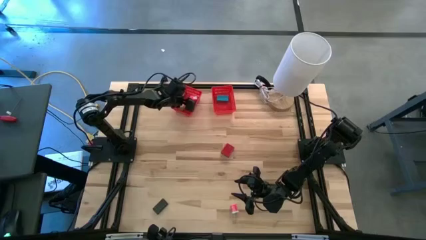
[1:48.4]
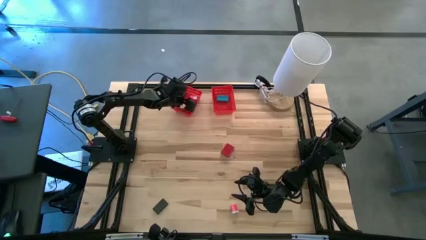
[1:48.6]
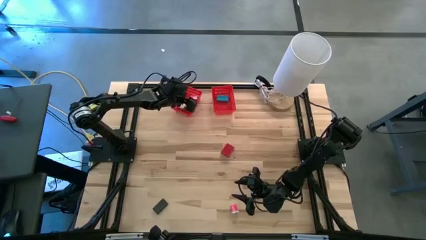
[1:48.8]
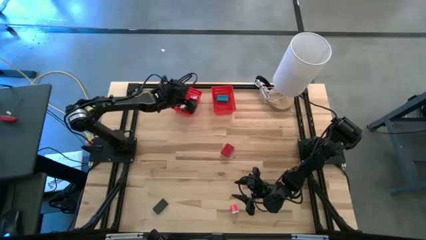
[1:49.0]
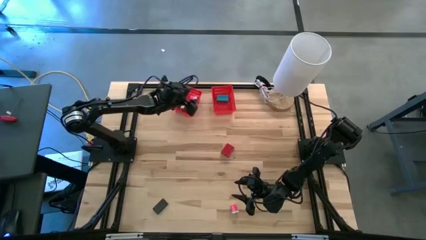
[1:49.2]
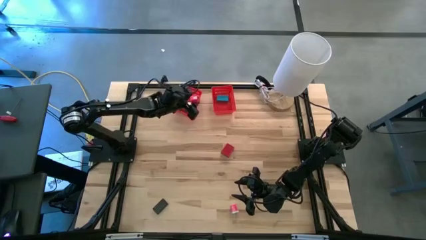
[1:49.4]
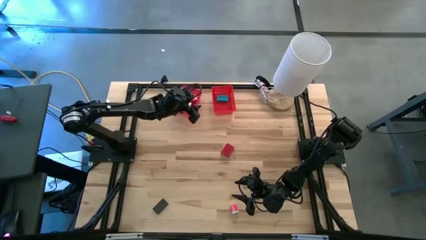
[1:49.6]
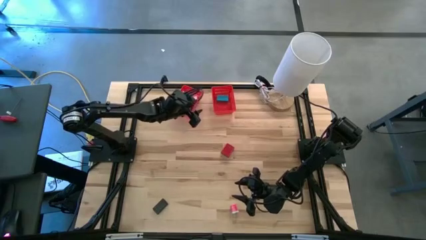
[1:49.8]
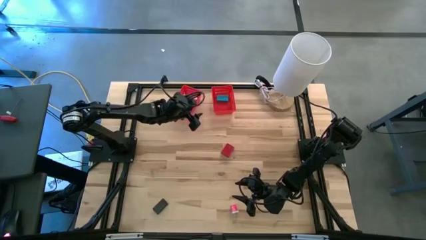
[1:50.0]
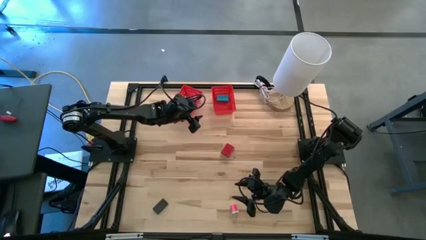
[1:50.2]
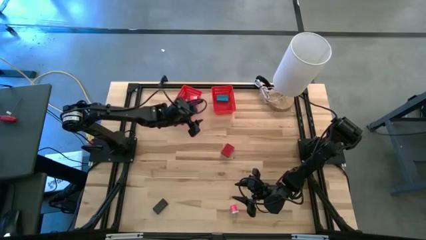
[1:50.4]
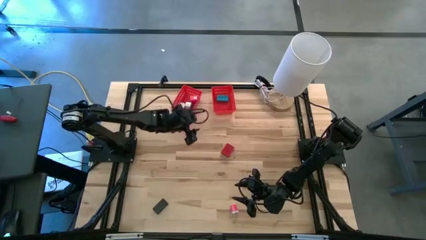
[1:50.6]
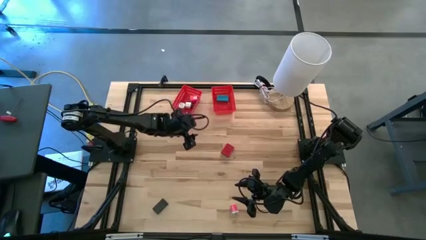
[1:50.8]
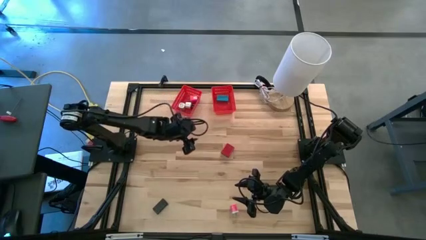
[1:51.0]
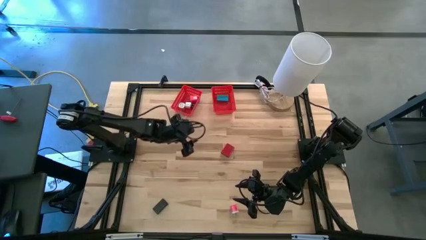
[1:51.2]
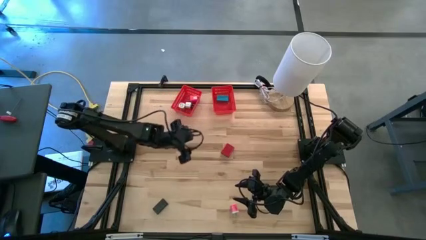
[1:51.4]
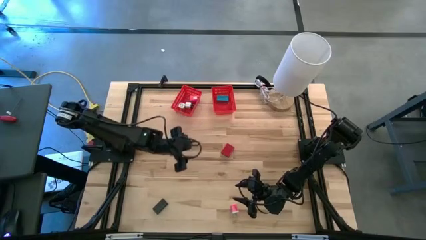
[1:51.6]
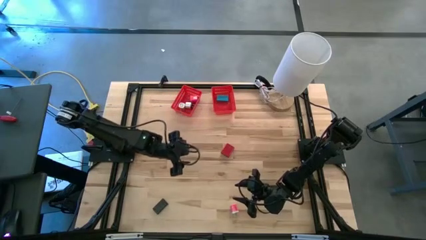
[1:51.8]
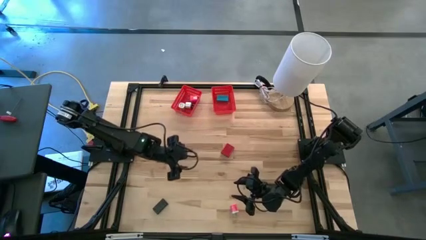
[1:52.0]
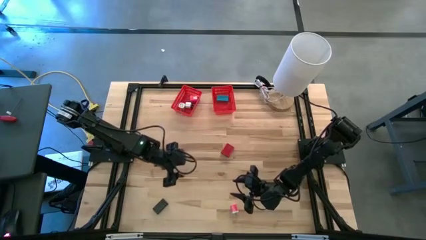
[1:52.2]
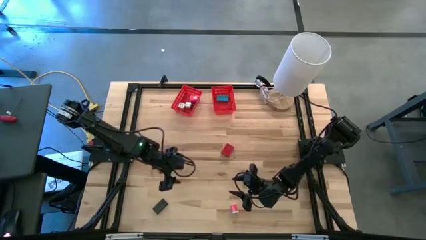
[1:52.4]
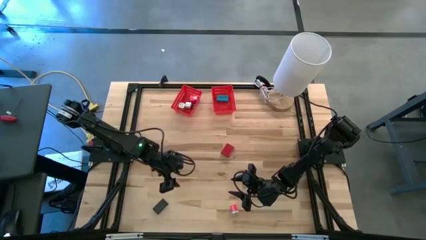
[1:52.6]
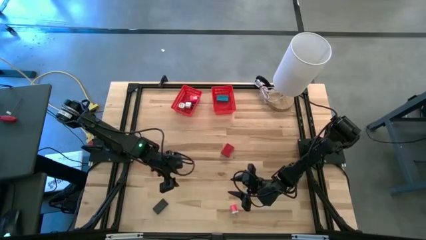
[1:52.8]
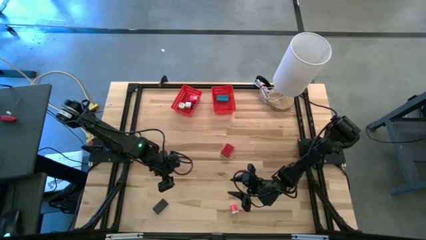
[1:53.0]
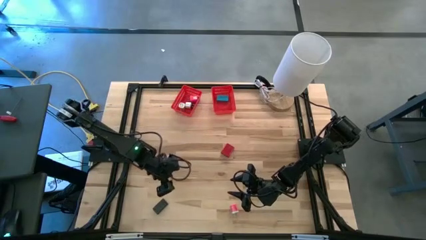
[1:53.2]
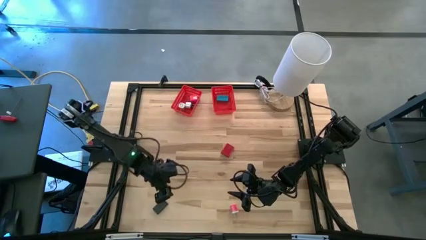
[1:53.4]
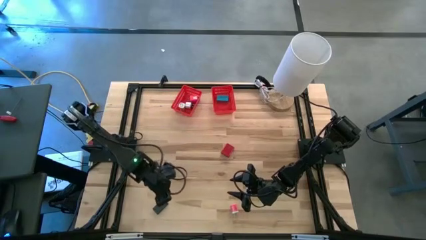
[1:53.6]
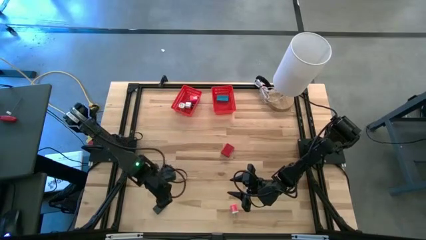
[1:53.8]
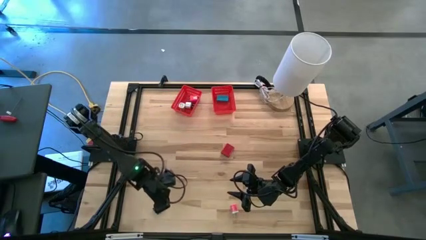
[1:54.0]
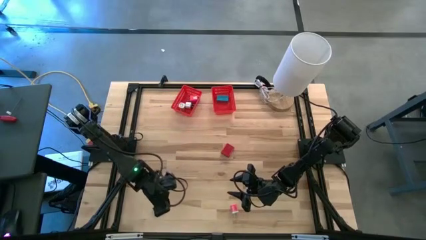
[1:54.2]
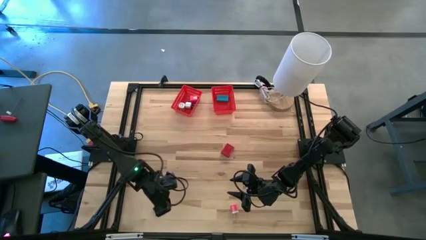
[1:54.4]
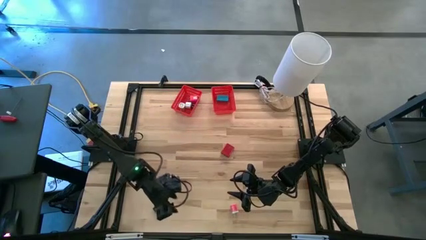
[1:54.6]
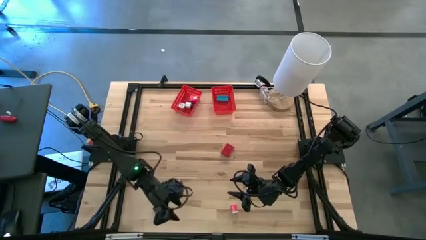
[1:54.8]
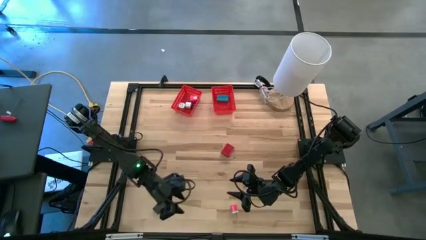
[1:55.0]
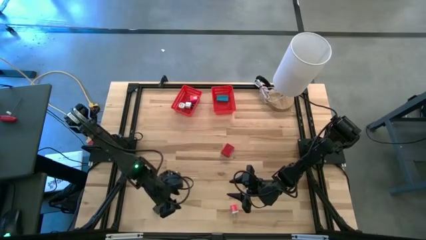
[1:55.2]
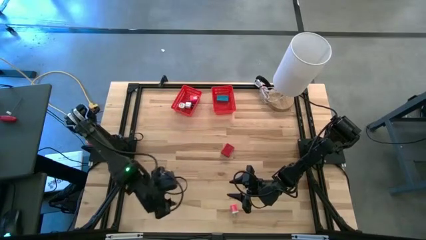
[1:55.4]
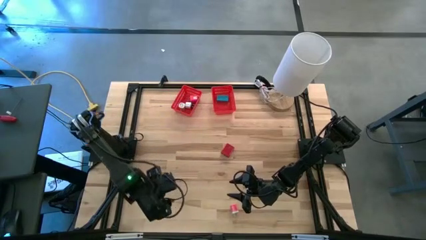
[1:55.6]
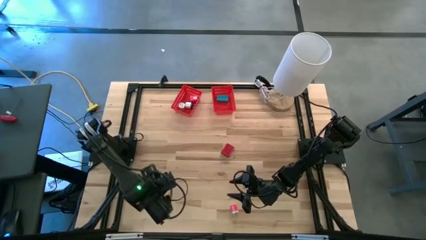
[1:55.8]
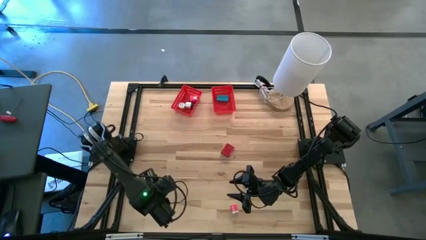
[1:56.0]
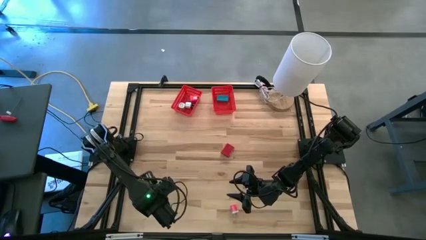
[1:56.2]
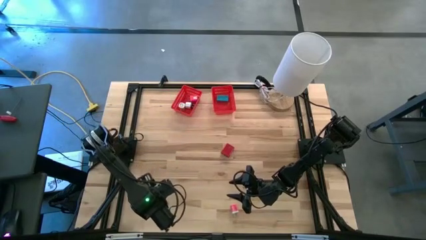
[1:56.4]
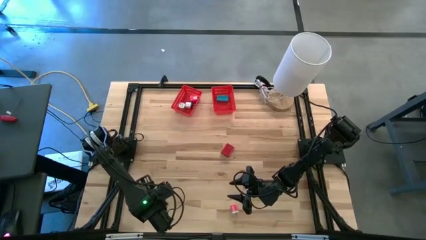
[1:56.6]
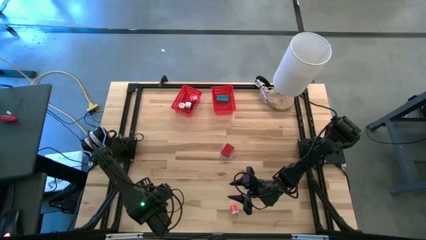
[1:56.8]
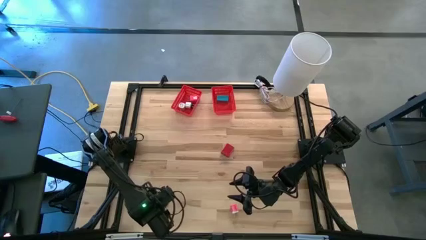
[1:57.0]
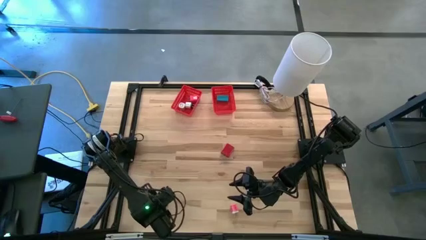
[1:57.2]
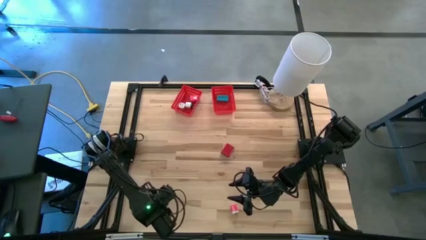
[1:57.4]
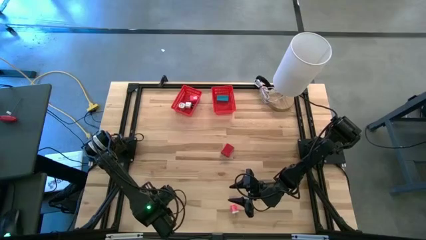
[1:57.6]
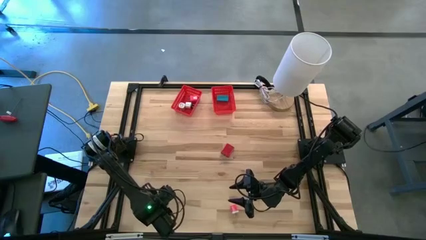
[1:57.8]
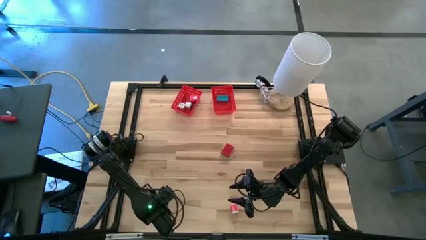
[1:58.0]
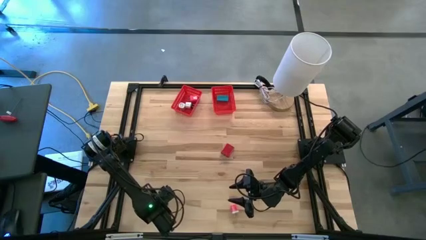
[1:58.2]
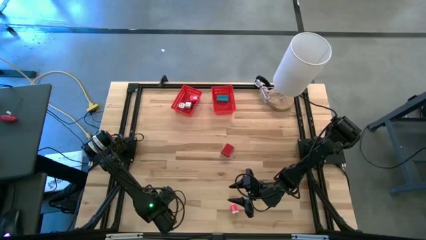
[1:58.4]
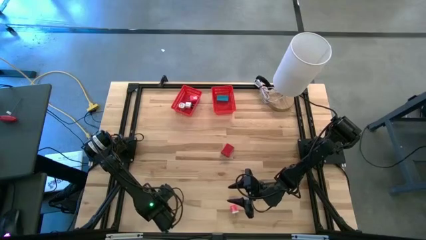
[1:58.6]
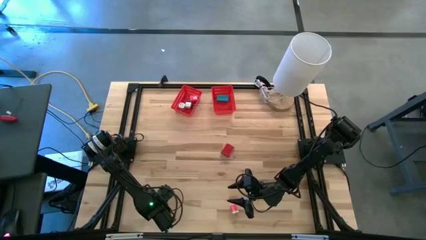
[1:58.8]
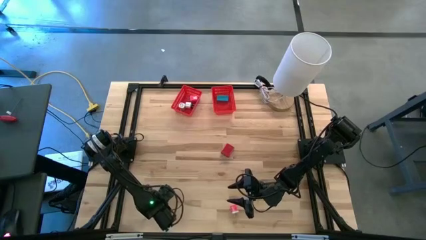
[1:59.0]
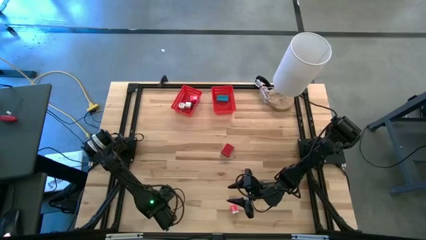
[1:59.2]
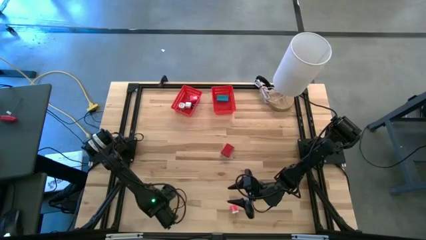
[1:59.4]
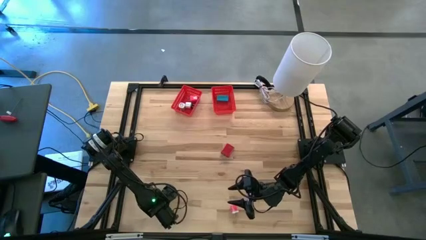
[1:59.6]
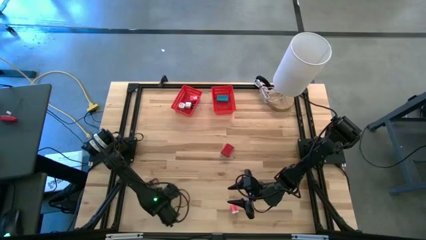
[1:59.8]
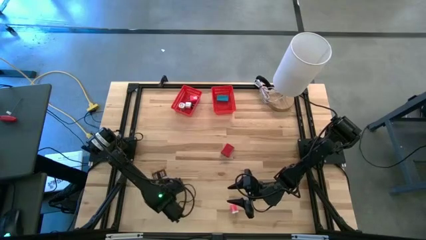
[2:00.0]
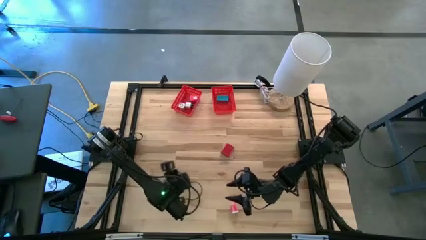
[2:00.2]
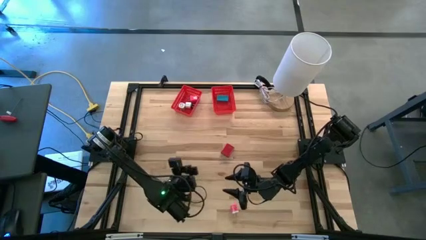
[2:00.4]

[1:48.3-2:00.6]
Task: Pick & Place Office items
Put the black digital clock into the right red bin
